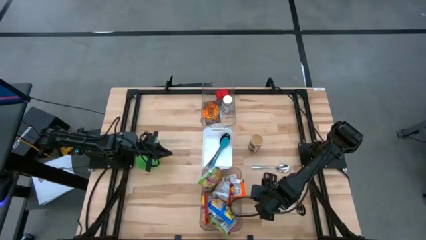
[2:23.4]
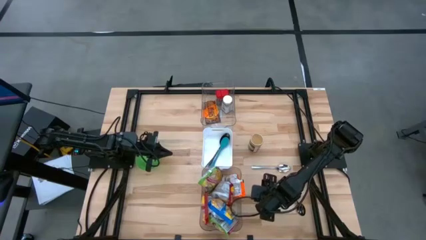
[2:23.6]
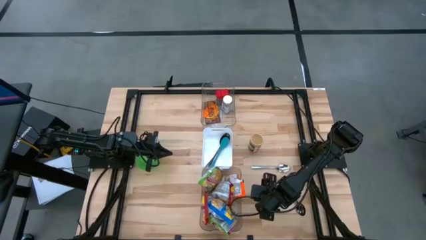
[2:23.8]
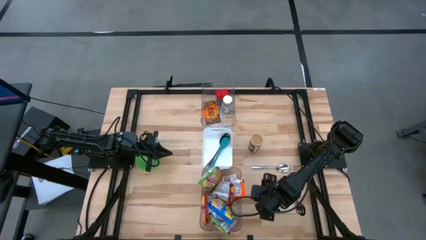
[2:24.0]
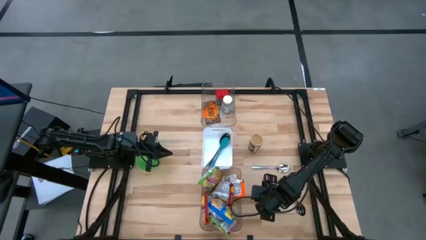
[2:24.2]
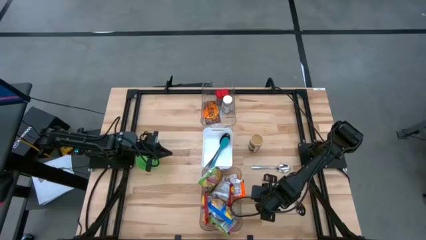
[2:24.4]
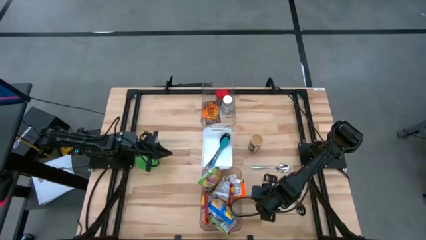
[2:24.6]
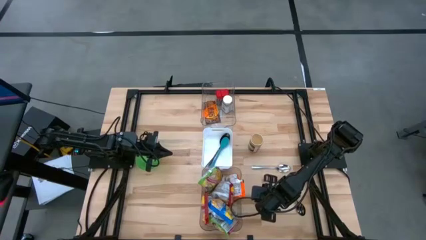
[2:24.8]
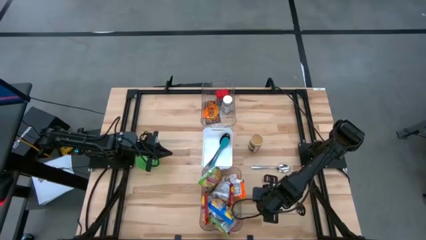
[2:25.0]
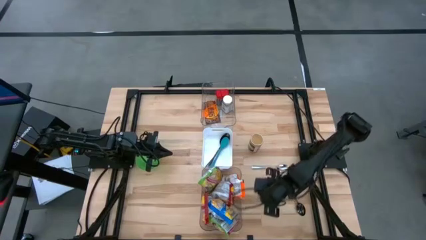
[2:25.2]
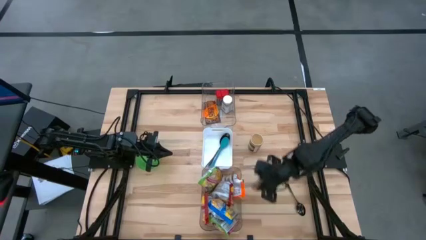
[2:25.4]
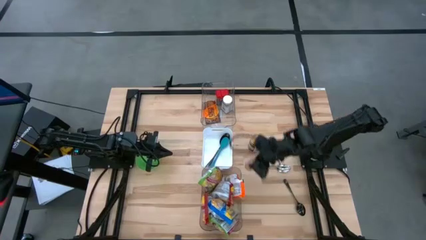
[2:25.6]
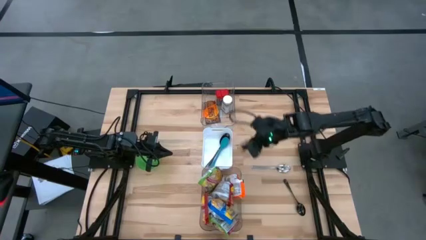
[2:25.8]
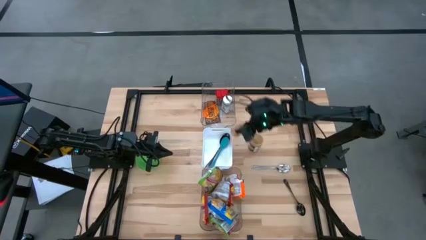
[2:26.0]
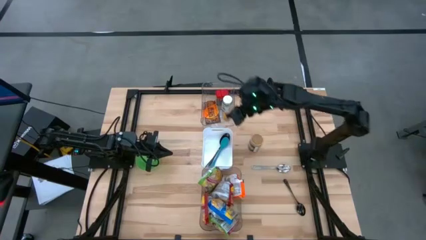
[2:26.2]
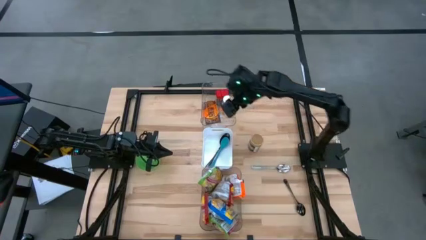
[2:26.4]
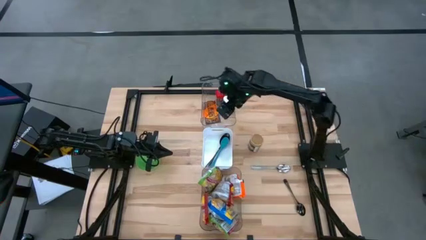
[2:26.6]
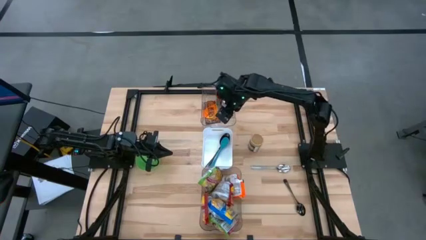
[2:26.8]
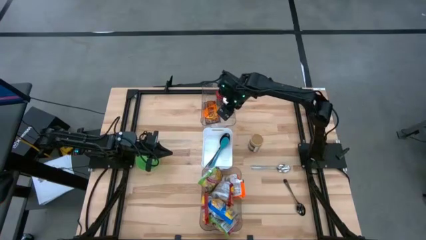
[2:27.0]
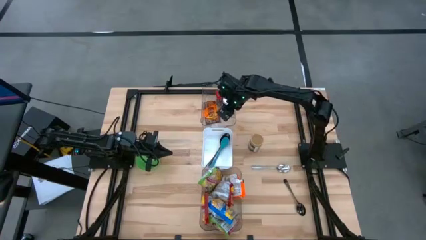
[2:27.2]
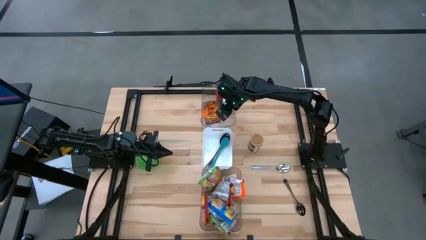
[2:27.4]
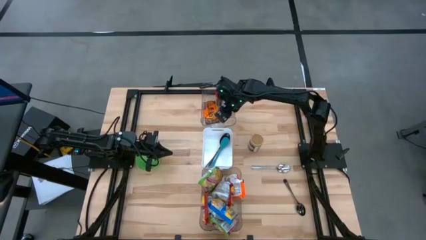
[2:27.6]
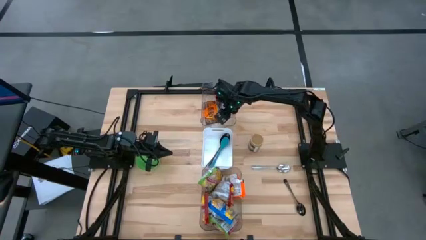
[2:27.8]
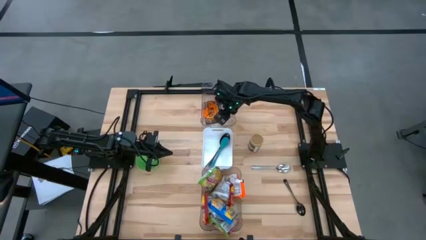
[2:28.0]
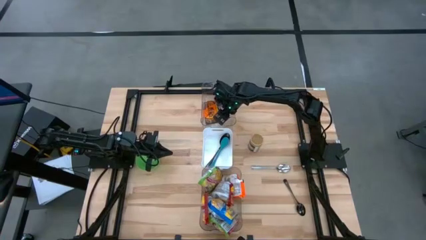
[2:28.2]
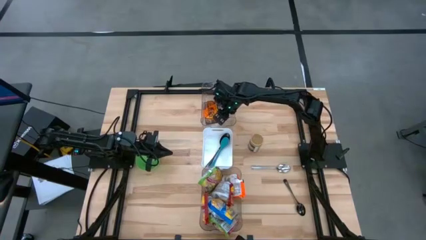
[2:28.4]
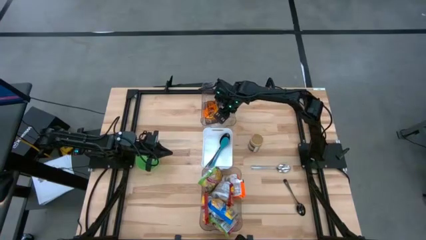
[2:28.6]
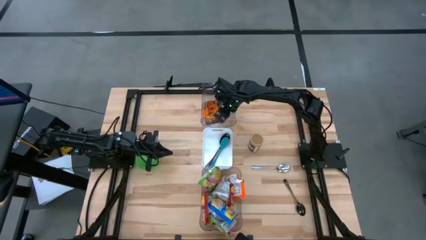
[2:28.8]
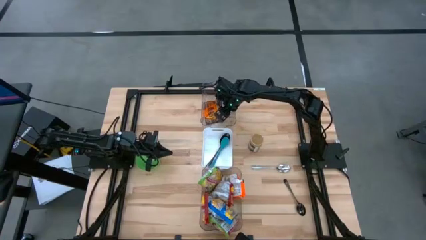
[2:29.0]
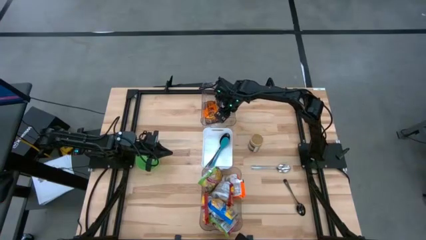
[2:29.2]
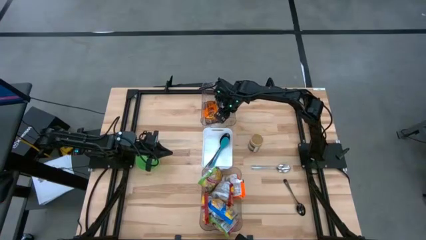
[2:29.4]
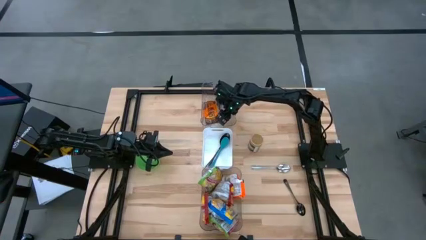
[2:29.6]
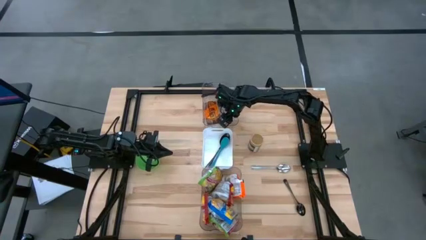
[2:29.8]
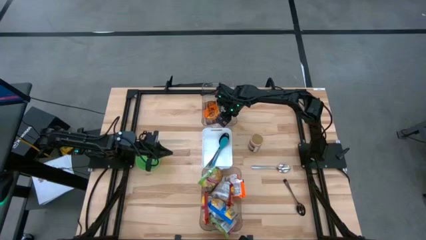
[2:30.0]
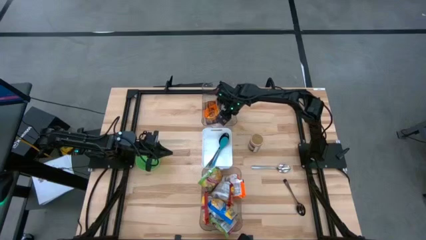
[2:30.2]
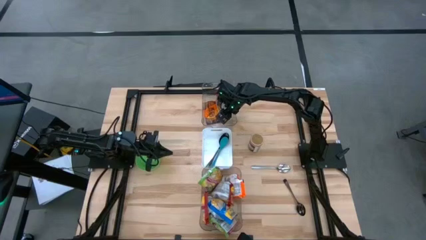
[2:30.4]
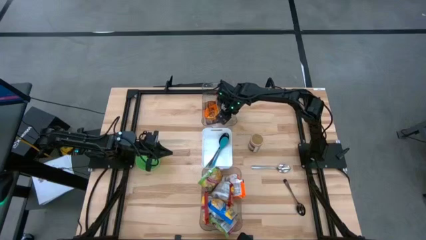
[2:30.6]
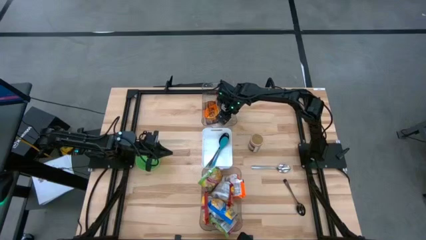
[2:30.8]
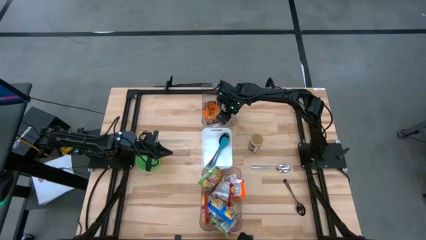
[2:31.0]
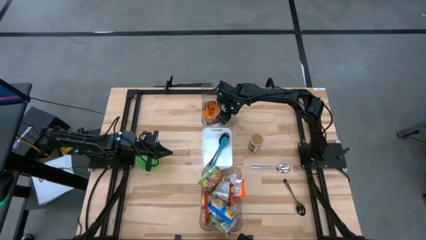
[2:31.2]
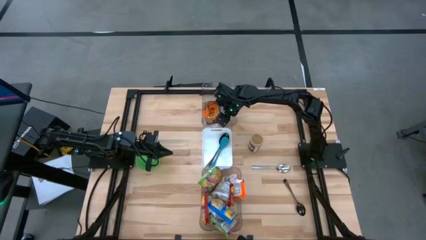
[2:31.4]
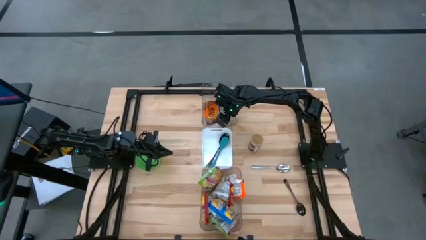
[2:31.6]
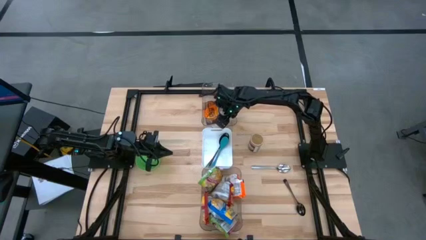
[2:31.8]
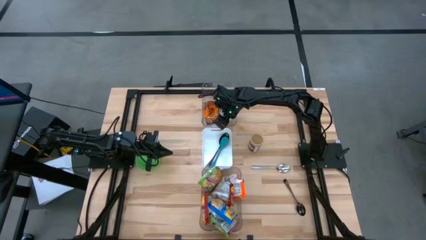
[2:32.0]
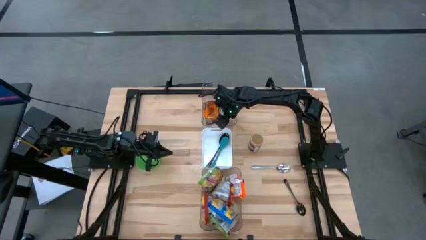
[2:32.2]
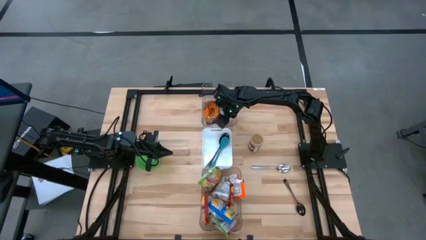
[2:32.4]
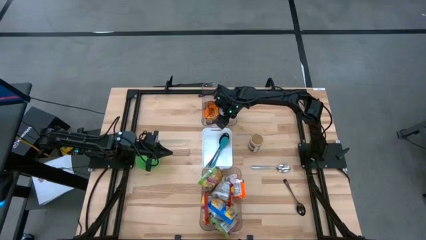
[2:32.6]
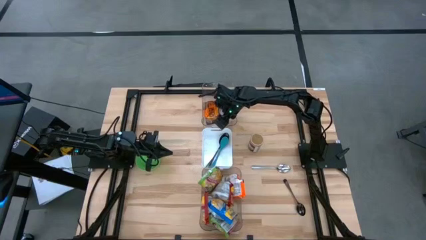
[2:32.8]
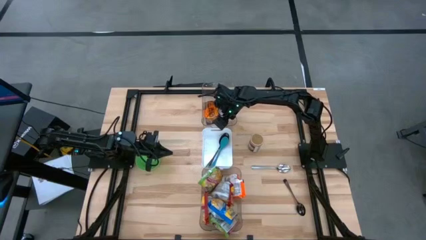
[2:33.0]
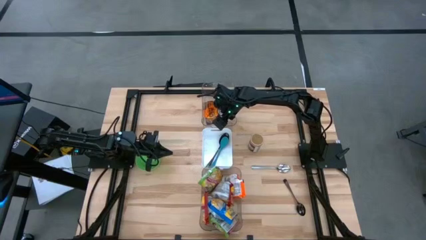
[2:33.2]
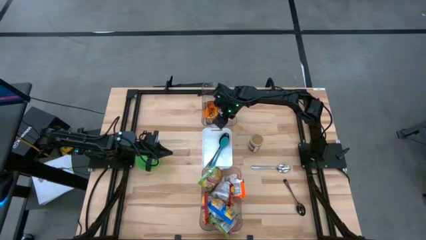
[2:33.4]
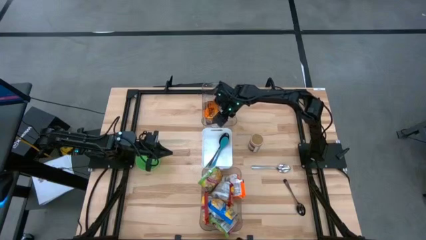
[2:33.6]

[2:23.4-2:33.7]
Task: Pick & Place Food Item
Put the brown seasoning bottle into the top transparent bin

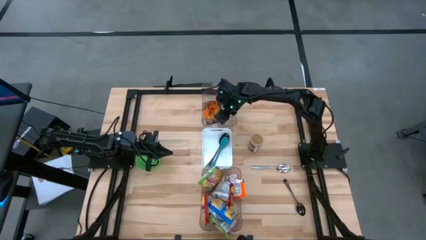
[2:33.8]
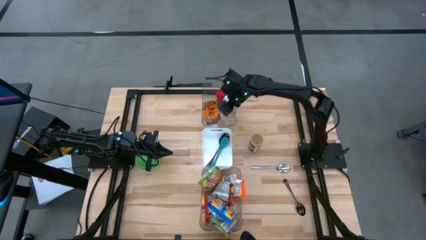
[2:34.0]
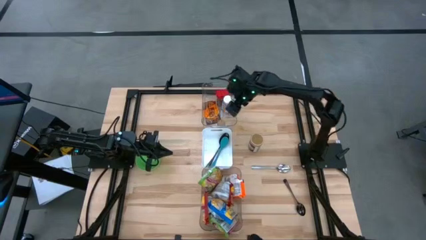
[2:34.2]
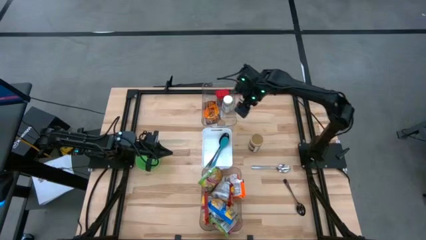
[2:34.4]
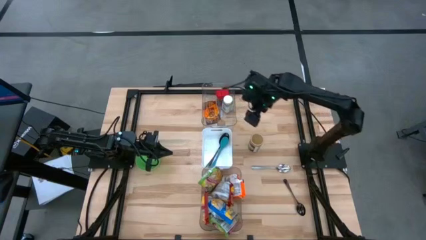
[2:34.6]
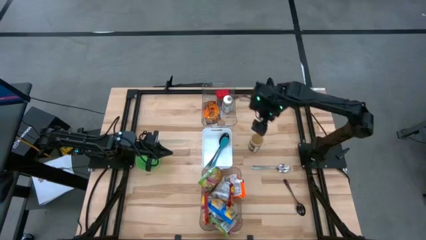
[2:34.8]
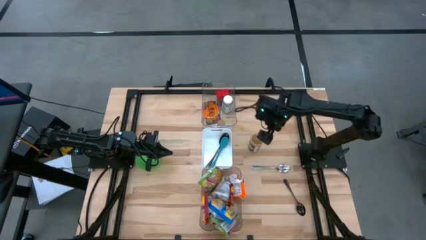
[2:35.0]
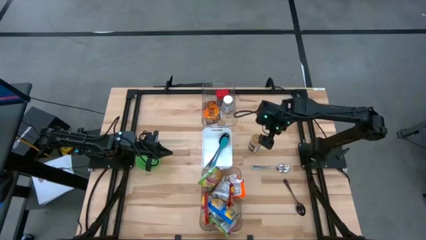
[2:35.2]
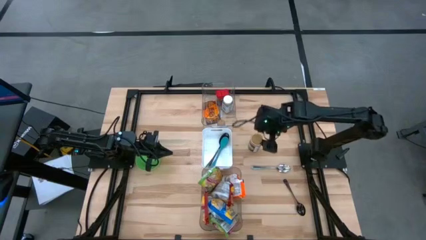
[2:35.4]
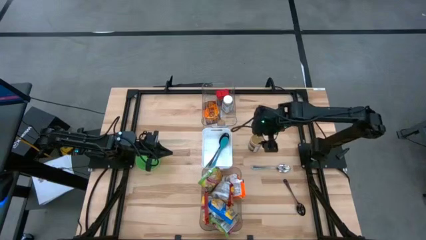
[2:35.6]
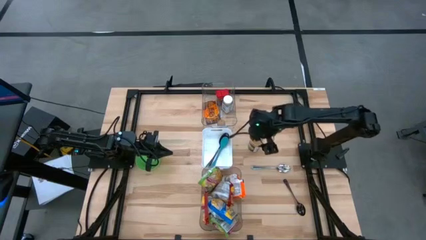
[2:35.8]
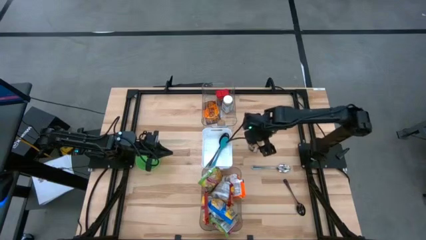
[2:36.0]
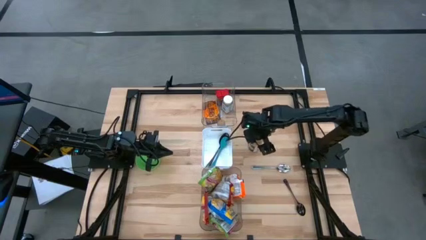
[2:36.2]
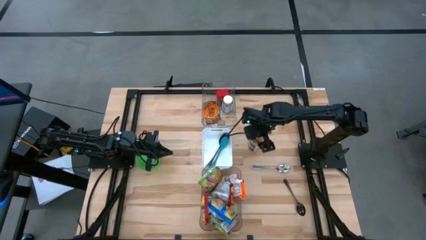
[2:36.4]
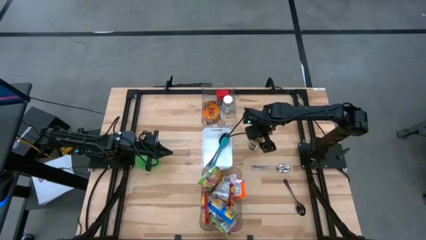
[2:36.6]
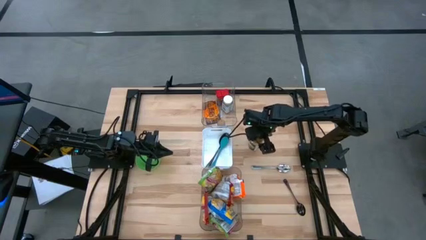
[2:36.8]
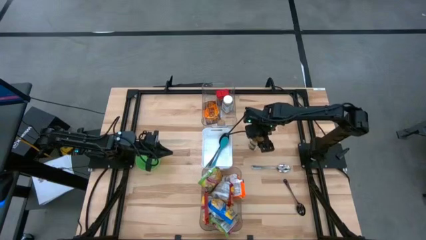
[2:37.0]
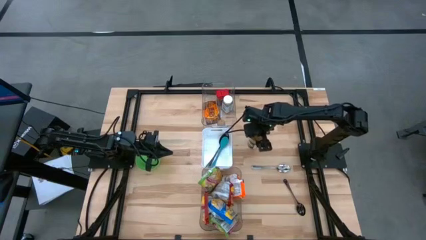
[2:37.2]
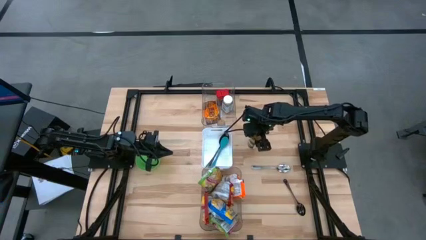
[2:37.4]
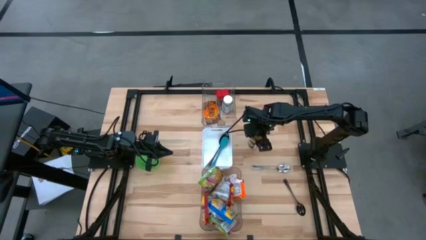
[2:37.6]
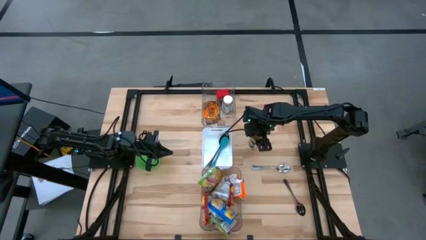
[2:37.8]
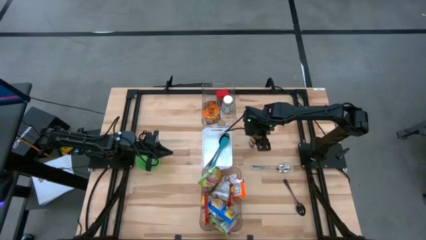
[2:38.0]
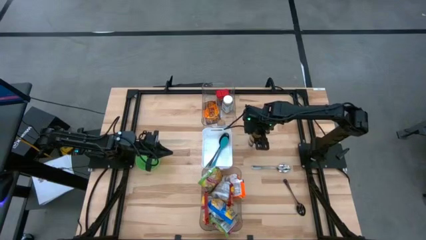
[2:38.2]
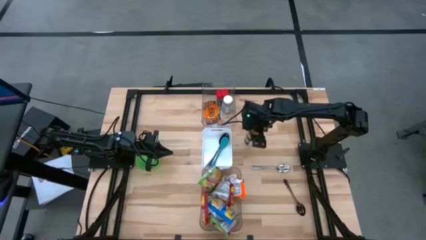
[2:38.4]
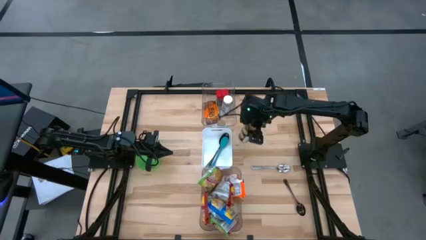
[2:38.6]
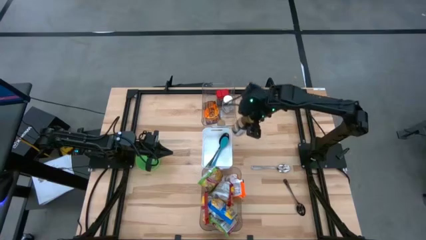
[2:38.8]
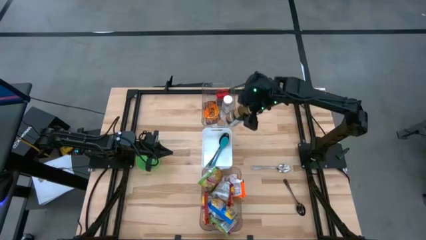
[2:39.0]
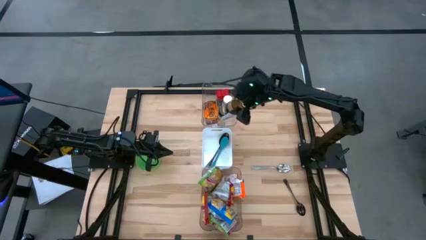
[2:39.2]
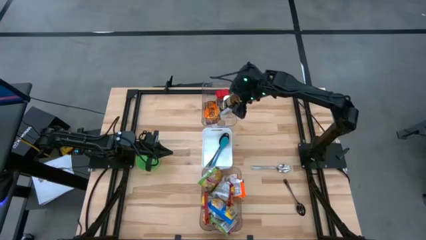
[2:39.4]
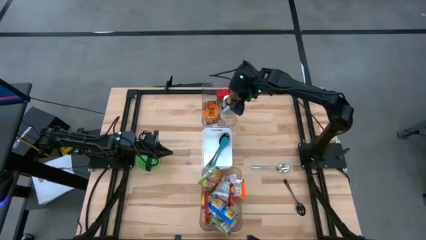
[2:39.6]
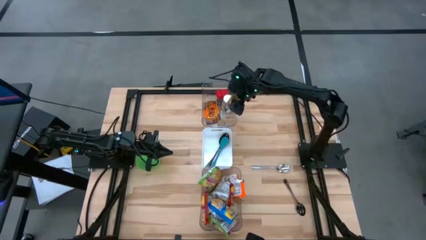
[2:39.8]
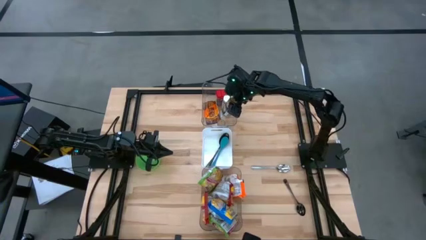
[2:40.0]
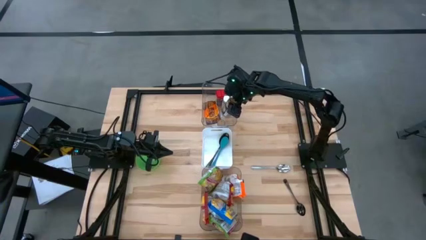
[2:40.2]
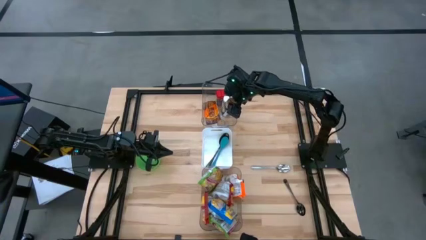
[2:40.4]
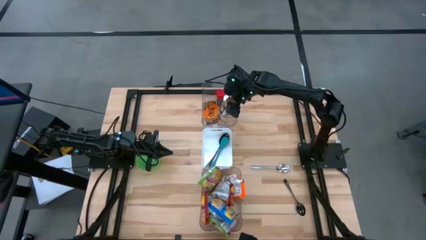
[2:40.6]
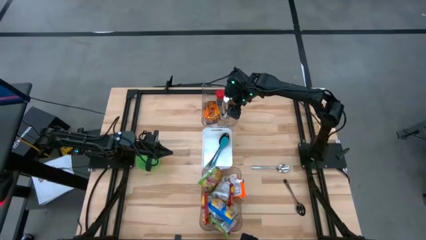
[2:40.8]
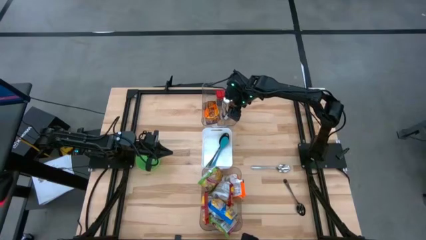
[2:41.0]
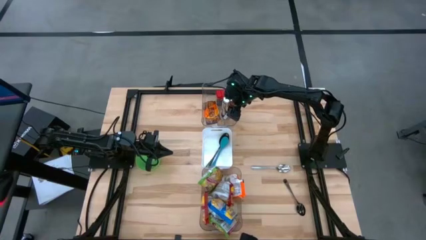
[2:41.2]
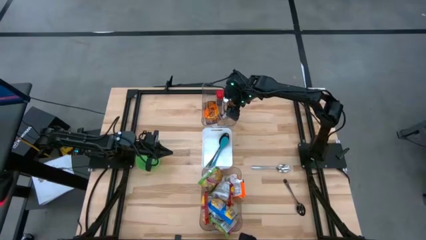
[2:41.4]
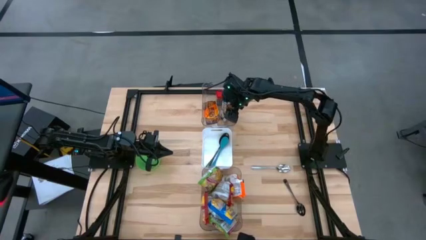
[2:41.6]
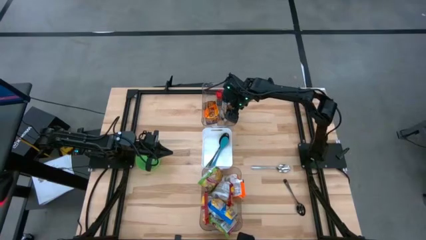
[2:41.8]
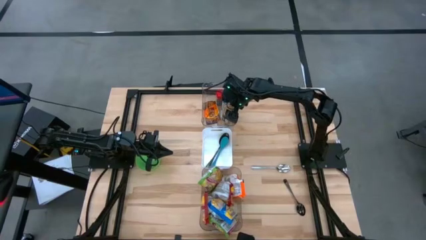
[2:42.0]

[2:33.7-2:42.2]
Put the golden seasoning bottle into the top transparent bin
